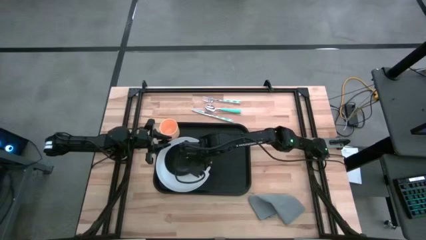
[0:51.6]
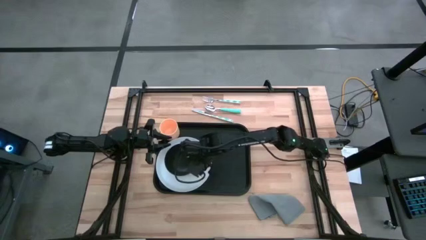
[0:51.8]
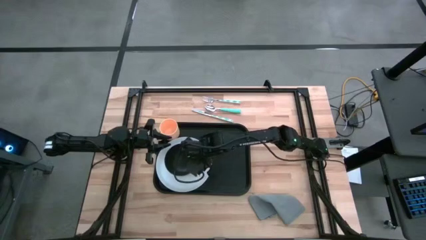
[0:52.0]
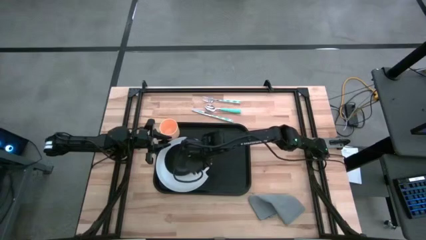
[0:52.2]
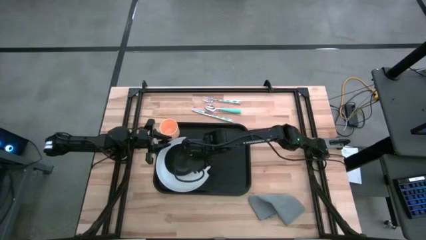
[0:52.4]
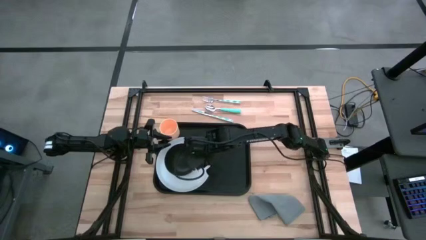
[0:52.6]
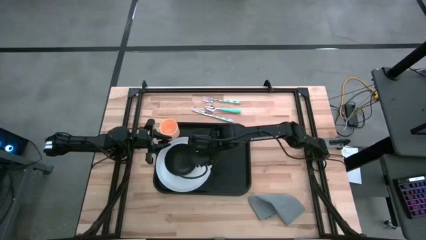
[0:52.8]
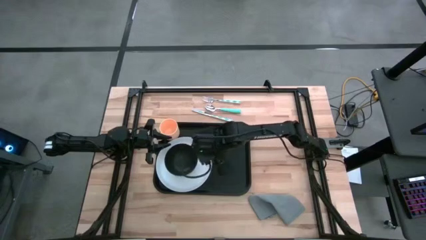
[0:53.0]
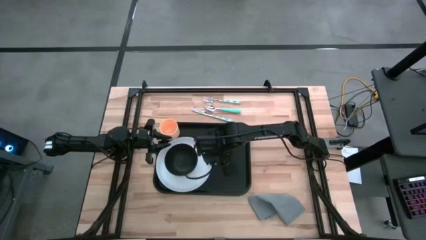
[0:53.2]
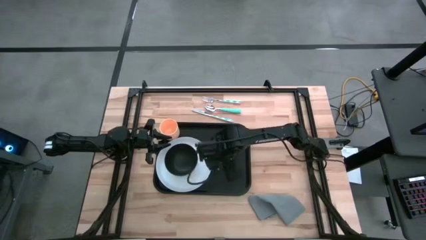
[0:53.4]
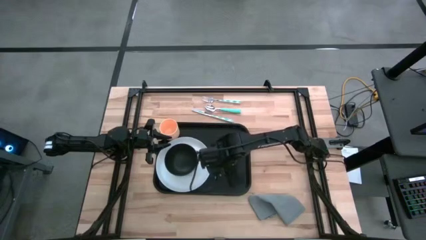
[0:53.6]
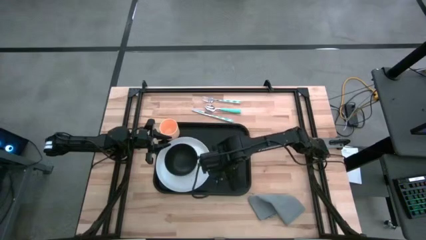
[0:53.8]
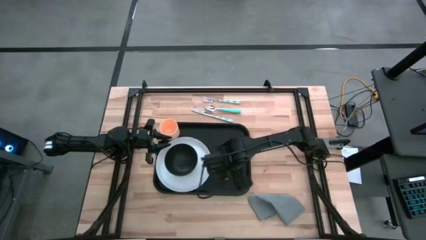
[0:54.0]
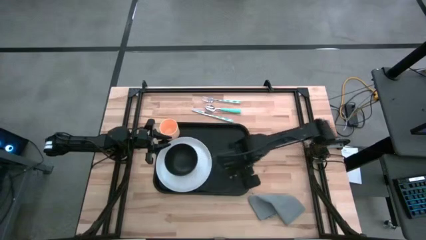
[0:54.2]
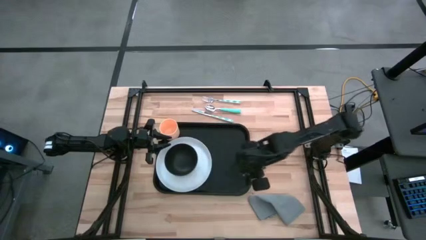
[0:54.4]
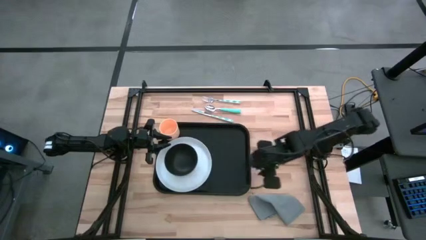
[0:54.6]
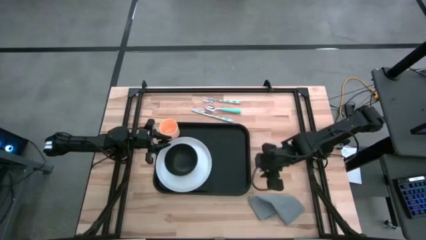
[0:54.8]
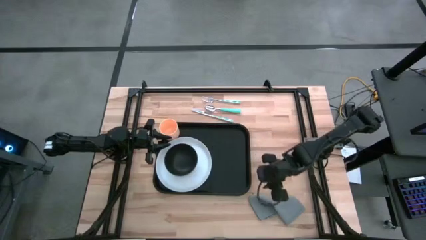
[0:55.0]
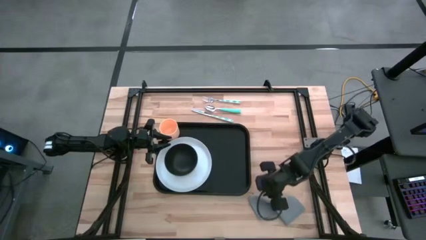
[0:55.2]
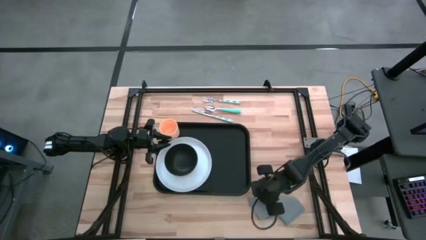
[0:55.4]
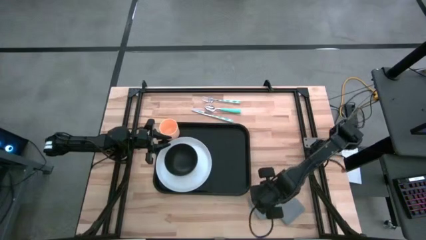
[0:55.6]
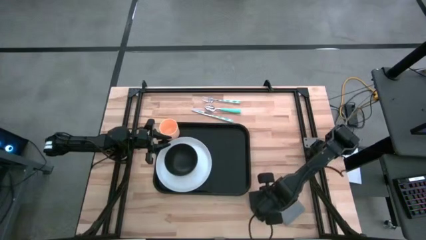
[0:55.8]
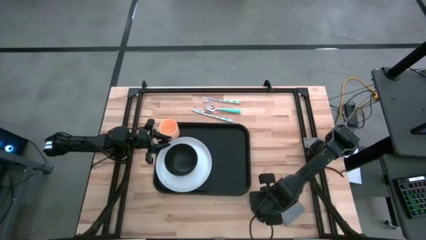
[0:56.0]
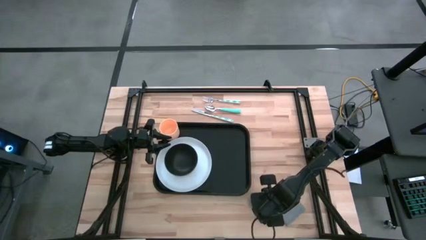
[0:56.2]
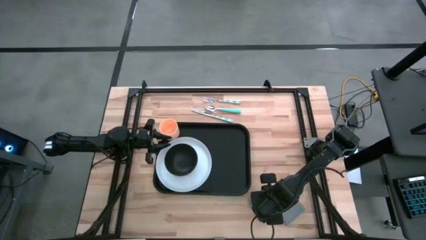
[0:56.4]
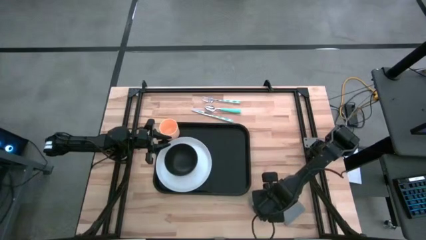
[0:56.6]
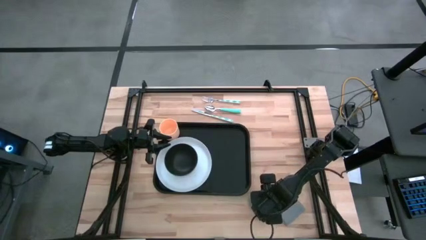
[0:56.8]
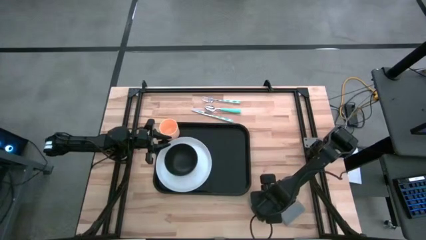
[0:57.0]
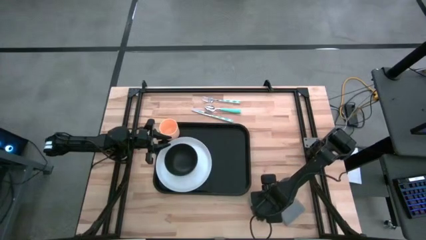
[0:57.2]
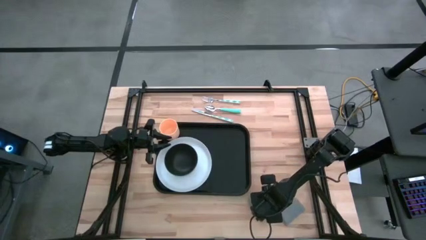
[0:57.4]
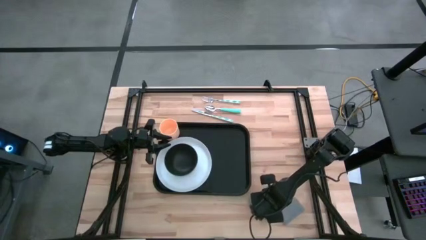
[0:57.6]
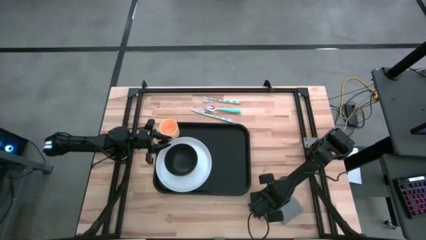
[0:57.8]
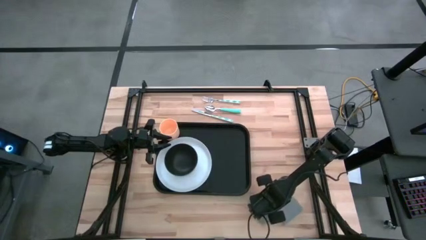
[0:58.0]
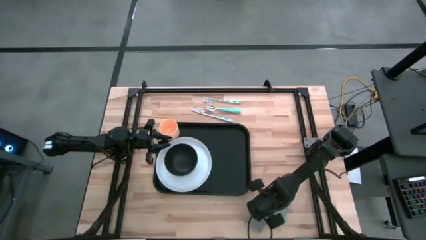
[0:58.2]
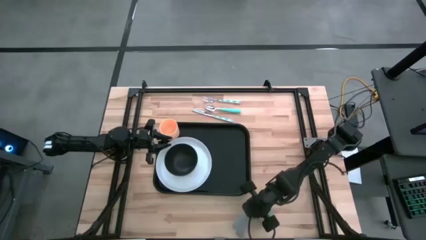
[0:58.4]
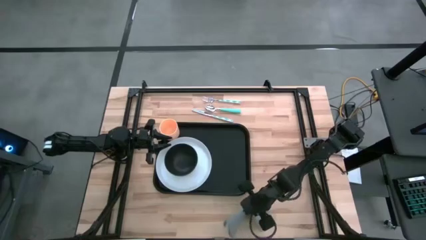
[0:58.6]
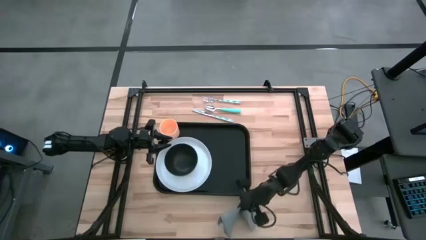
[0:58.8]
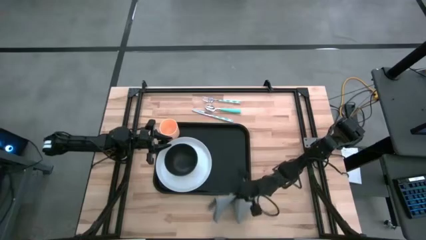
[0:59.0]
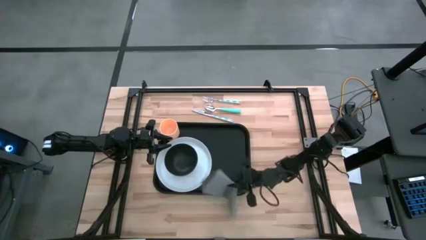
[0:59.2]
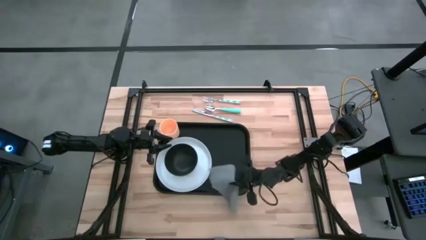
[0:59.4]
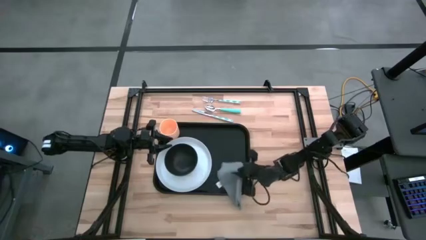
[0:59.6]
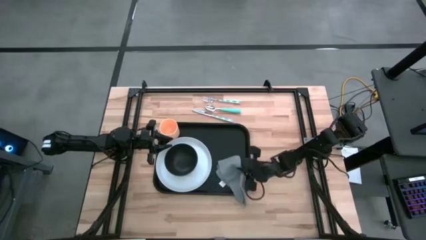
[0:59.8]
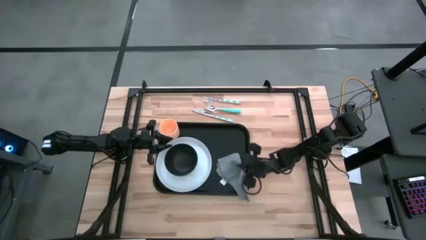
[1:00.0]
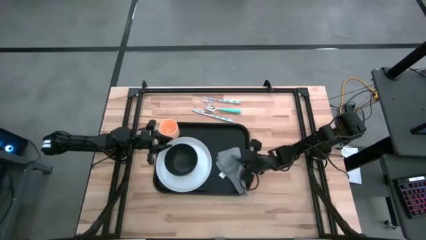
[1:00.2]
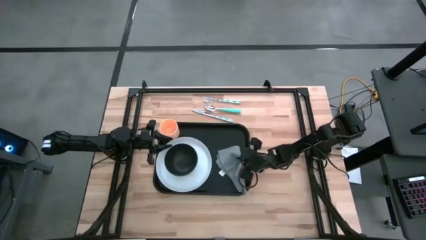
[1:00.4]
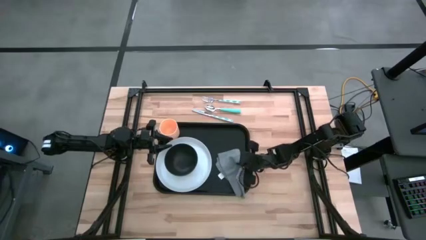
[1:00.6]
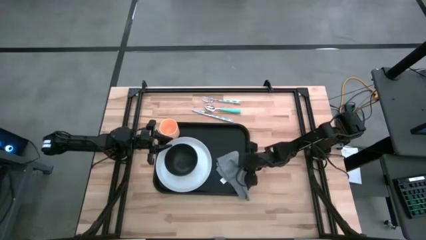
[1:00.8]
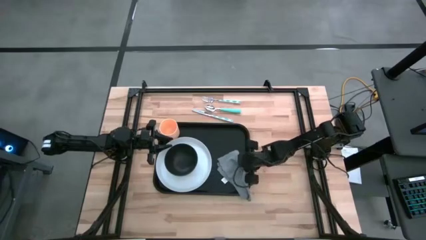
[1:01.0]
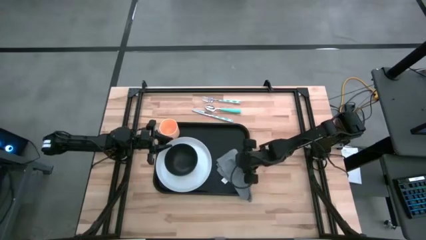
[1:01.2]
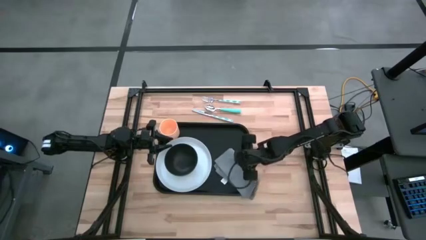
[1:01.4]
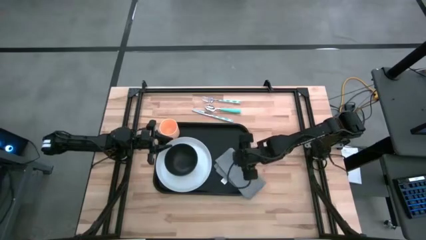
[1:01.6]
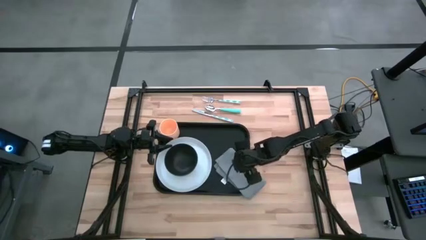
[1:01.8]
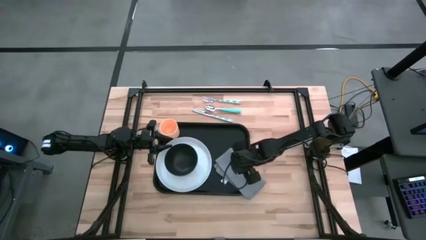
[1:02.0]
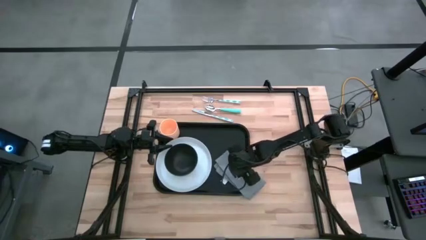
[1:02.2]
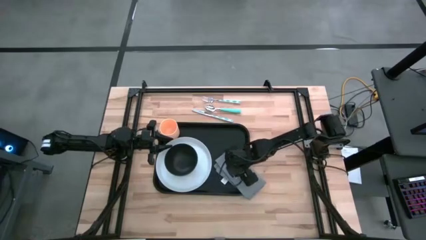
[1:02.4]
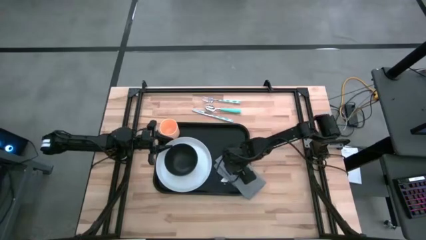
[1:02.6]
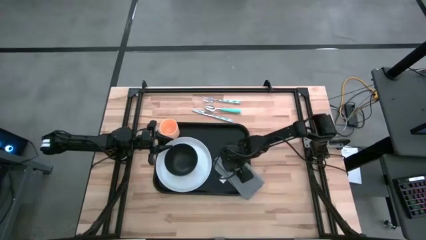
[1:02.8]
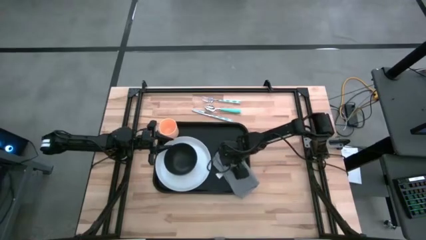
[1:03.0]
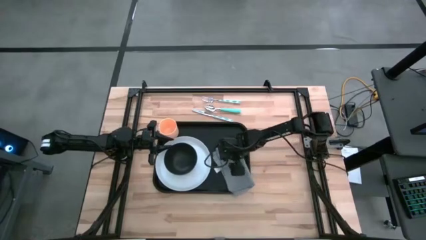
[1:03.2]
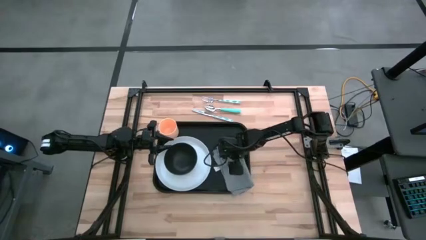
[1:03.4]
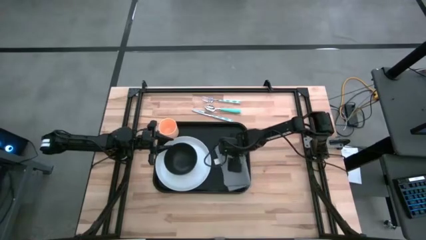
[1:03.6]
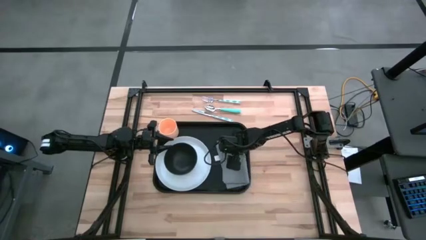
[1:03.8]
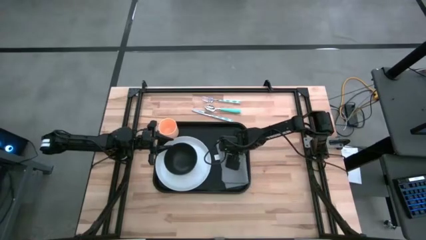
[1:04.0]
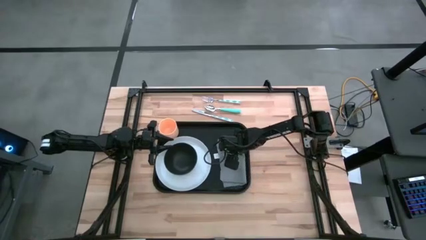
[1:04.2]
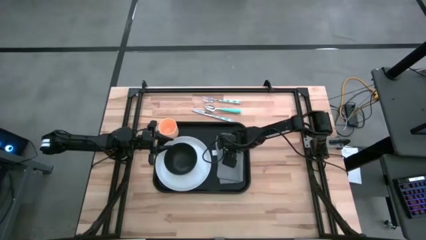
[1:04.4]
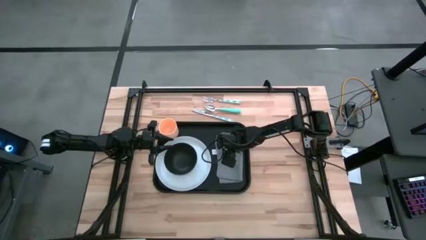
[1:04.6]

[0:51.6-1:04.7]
Task: Set up tray
Put the gray napkin to the right of the white plate on the black serving tray
